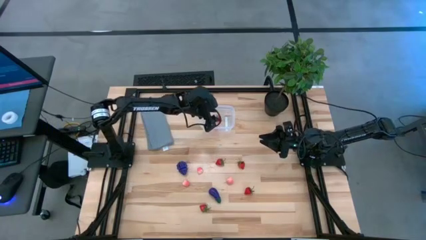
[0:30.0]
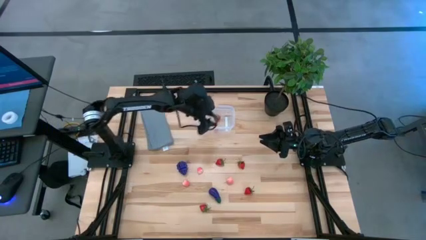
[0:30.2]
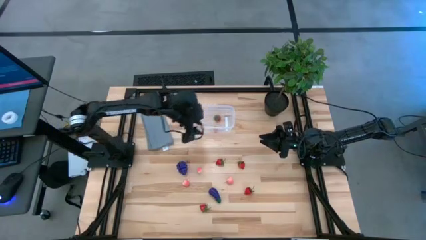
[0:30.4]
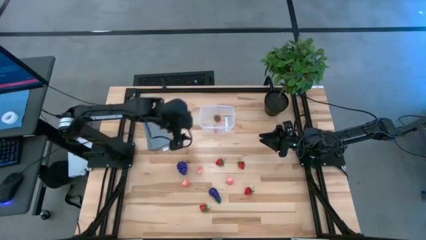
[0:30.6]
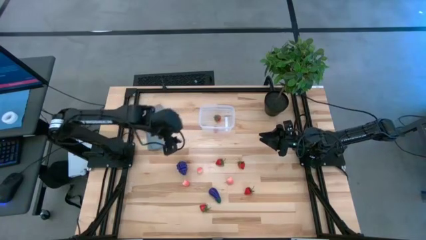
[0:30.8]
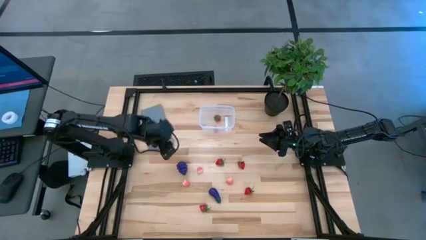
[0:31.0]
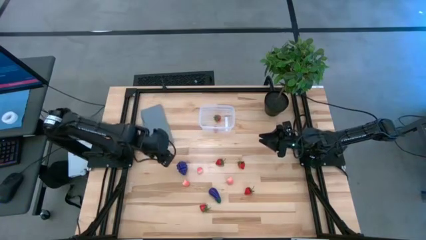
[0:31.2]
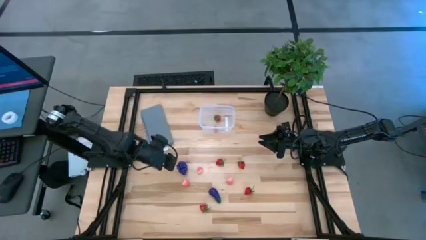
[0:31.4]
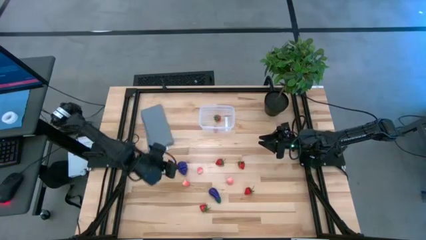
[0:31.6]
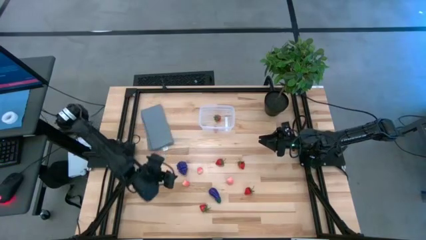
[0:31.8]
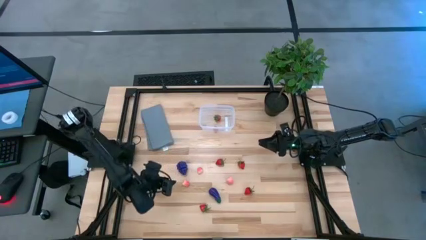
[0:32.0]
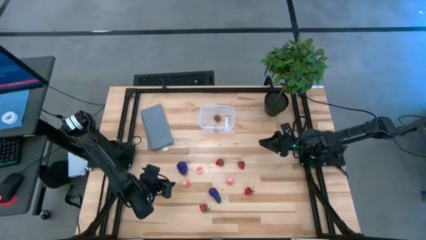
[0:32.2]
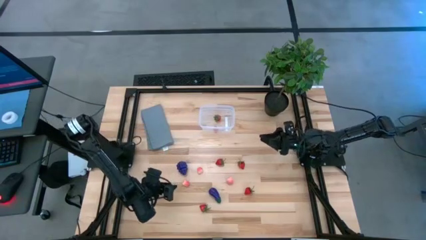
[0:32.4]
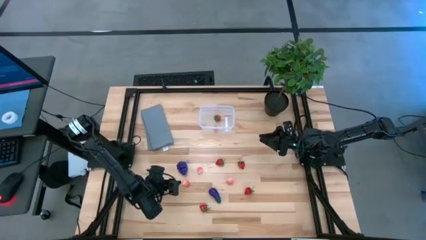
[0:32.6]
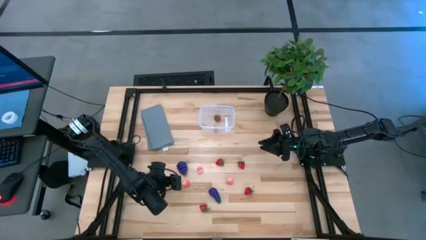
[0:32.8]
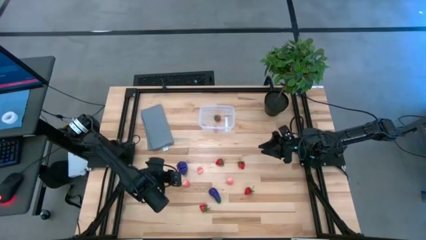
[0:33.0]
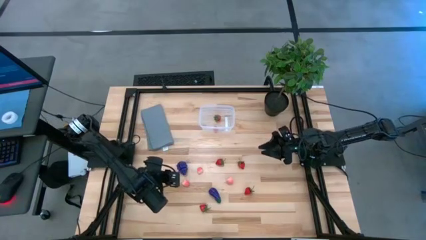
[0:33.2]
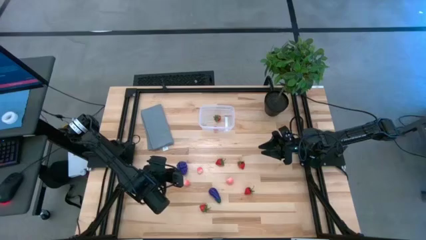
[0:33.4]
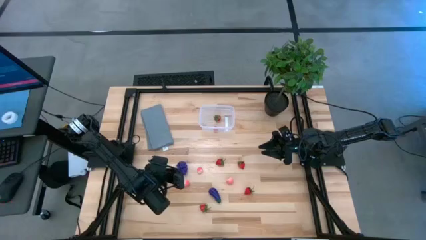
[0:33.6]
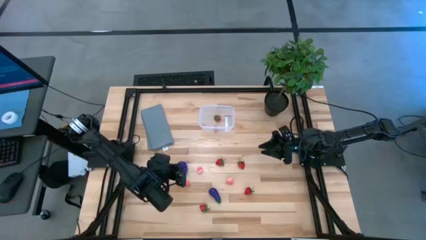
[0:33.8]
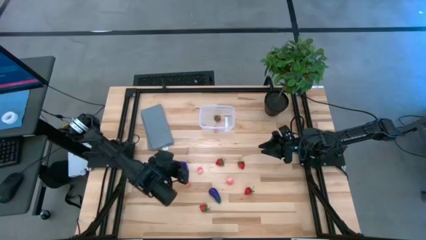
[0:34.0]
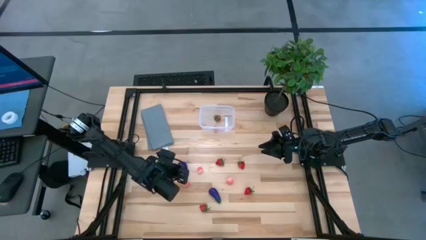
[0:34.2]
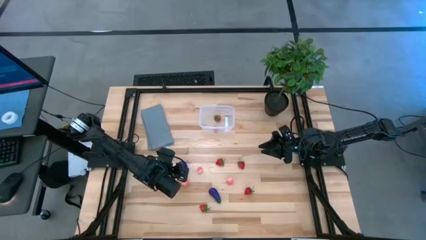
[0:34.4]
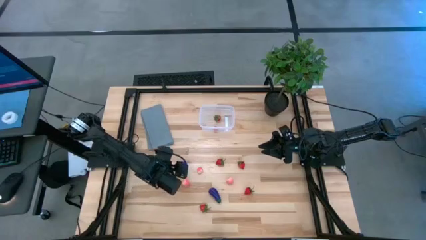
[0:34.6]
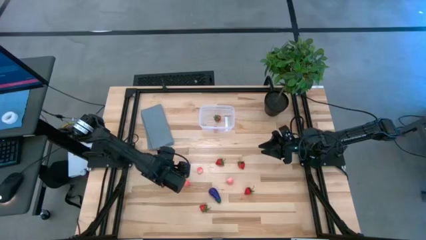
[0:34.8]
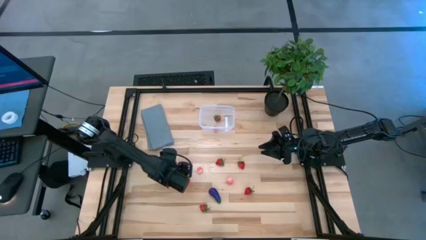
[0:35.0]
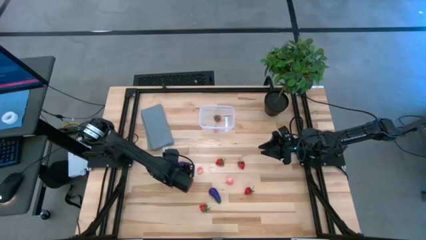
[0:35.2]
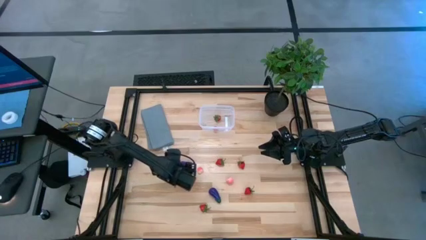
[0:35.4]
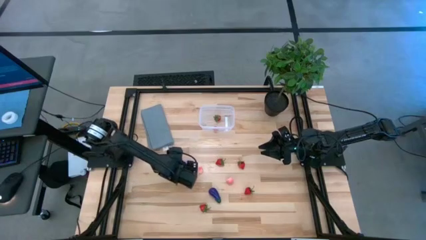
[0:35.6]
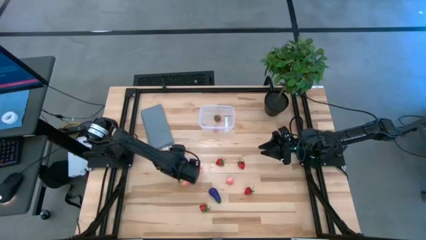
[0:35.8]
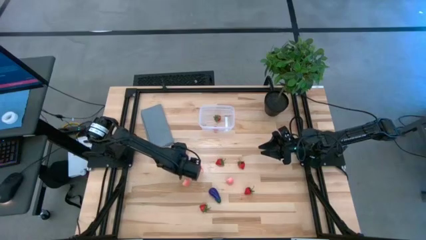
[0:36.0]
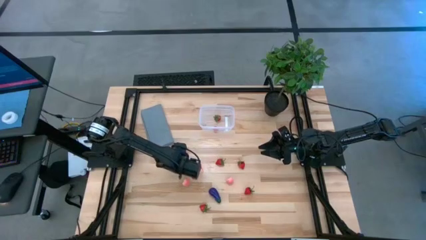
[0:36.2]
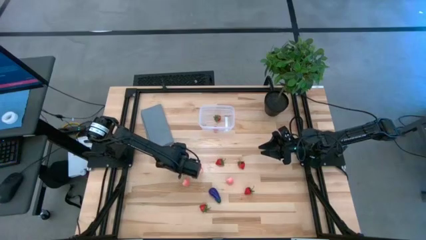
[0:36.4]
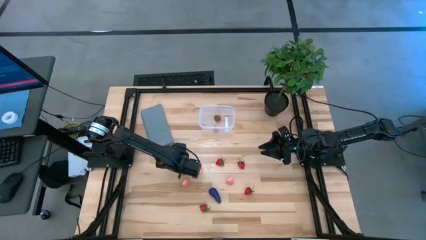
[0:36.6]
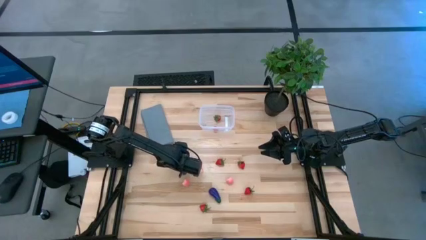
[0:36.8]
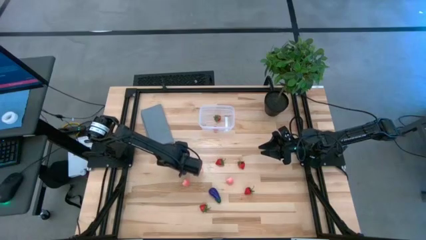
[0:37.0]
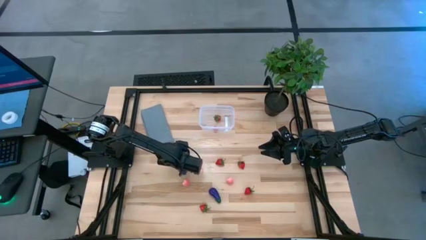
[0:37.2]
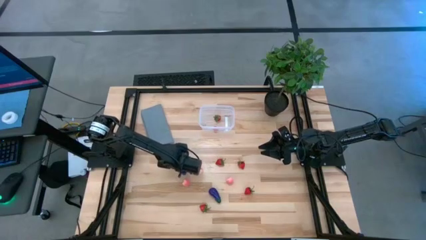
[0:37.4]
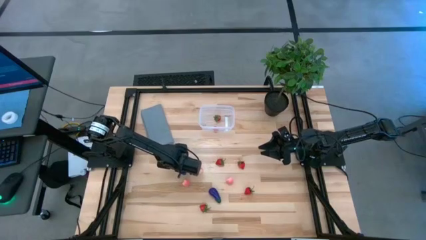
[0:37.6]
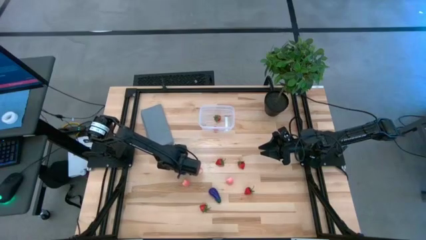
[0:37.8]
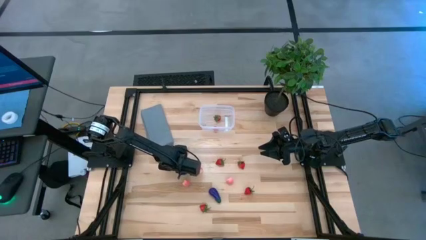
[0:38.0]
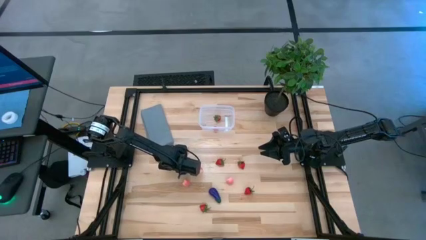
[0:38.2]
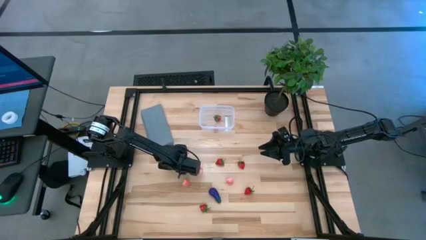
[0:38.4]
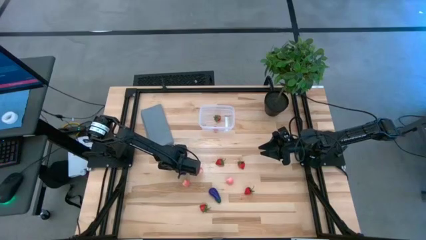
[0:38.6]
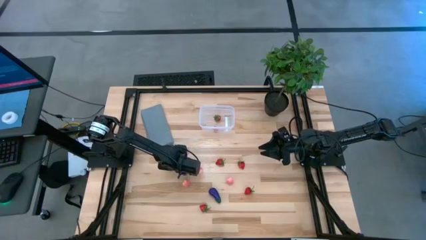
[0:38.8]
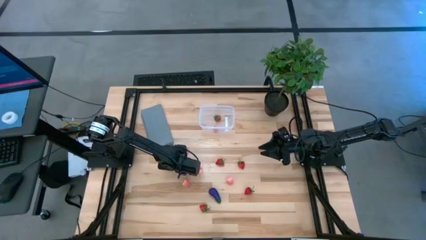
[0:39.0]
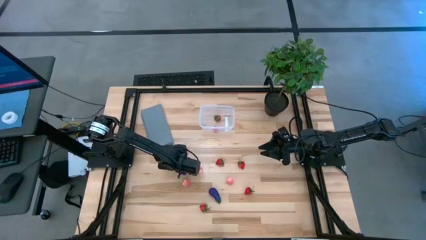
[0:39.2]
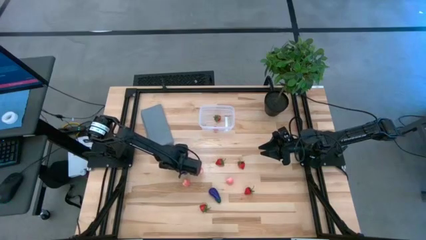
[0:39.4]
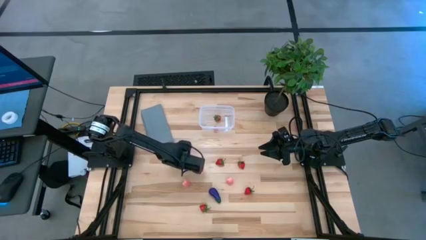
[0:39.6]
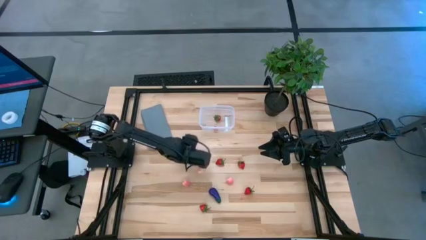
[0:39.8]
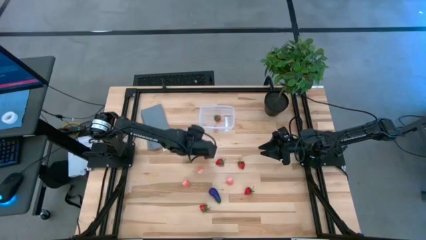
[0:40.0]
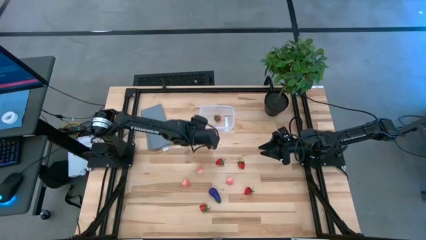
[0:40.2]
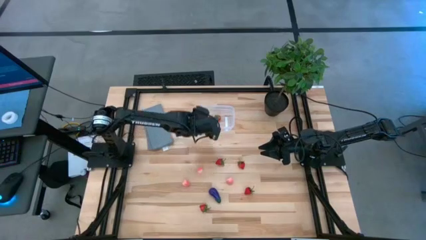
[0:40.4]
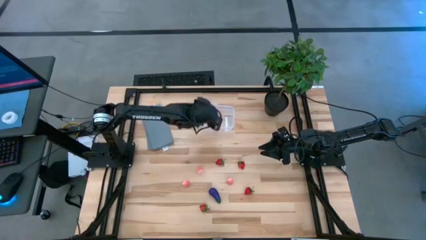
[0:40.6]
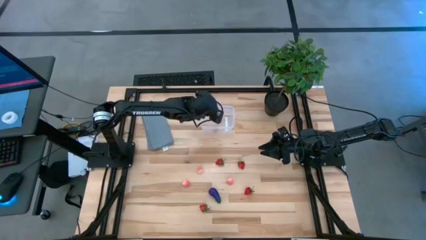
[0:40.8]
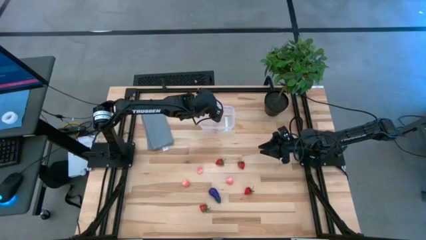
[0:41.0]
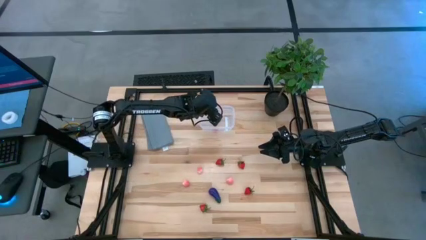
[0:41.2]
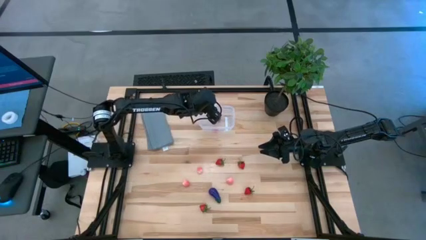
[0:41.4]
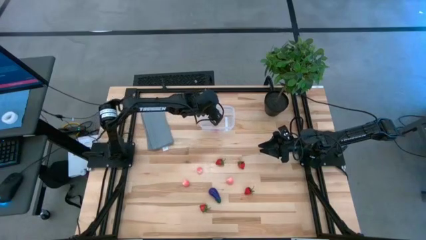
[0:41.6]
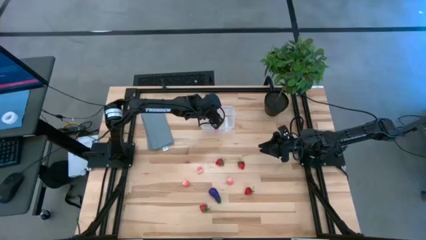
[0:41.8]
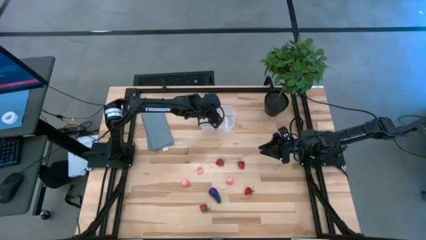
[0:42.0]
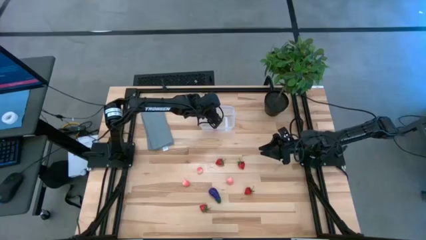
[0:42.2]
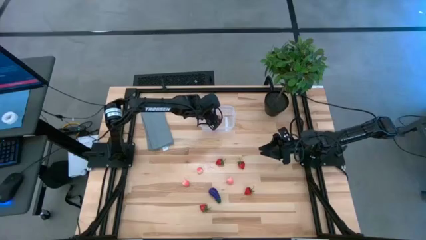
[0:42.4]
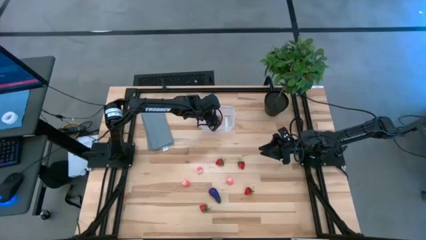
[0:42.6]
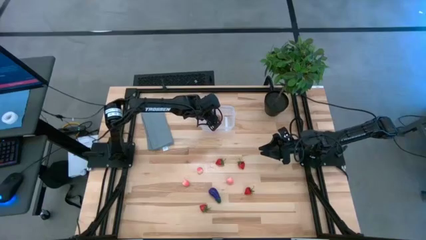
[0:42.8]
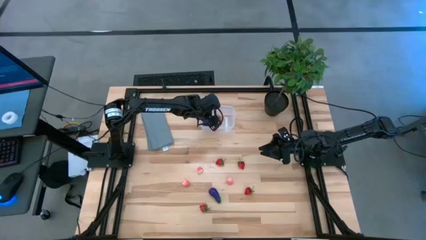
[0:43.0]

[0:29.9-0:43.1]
Task: Pick and placing Produce into tupperware
Put the grapes into the transparent bin

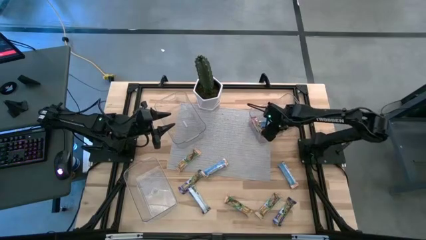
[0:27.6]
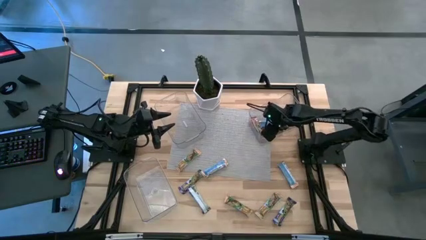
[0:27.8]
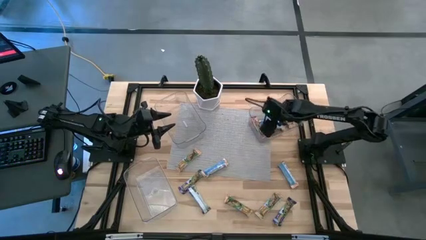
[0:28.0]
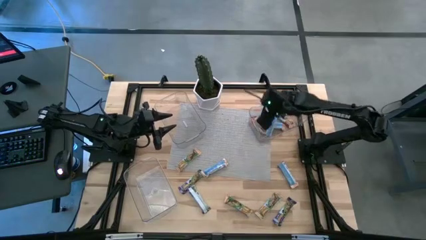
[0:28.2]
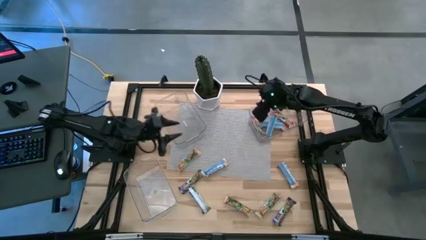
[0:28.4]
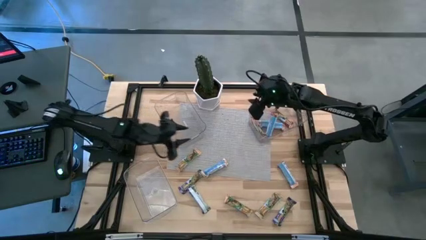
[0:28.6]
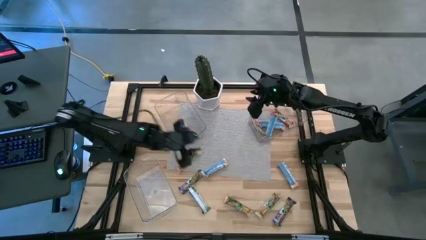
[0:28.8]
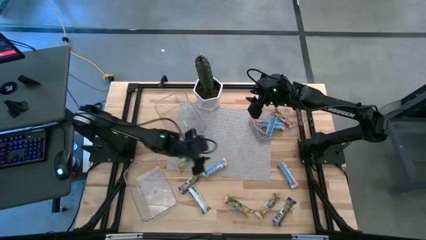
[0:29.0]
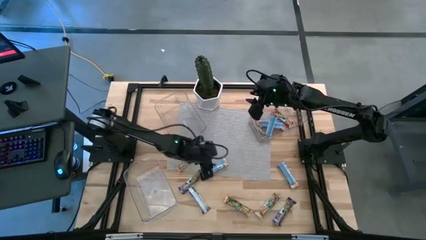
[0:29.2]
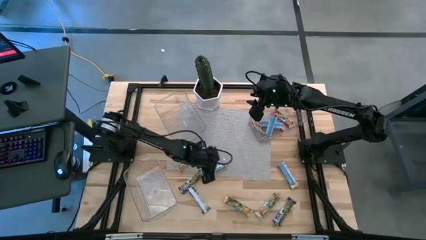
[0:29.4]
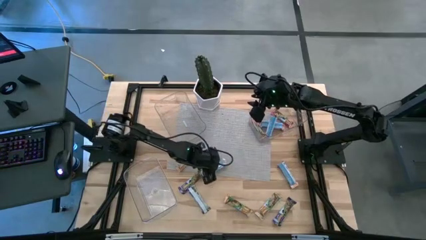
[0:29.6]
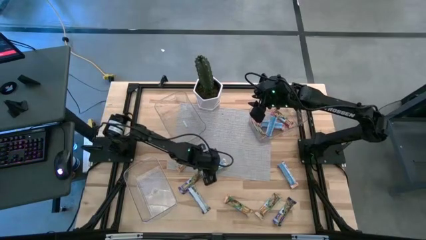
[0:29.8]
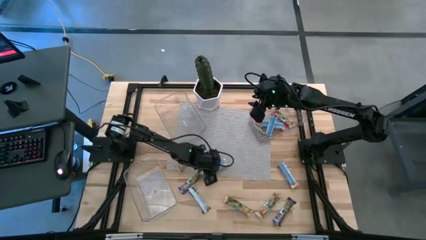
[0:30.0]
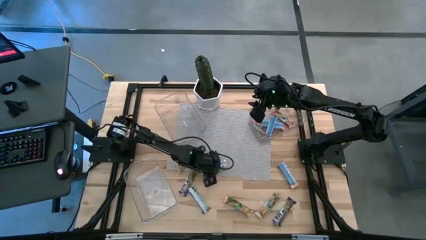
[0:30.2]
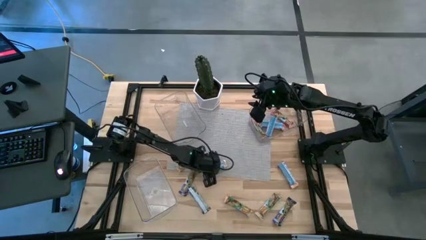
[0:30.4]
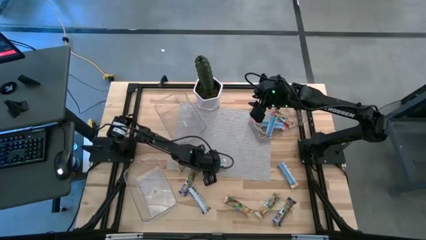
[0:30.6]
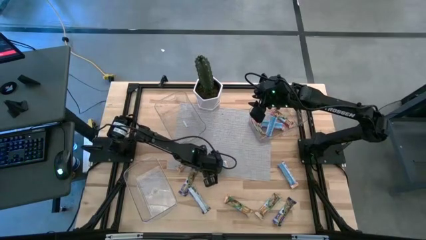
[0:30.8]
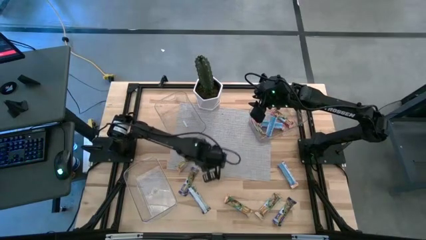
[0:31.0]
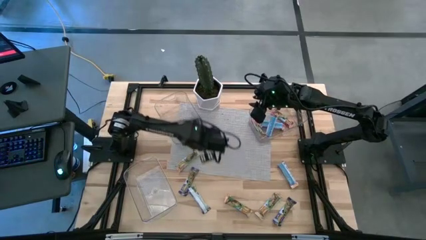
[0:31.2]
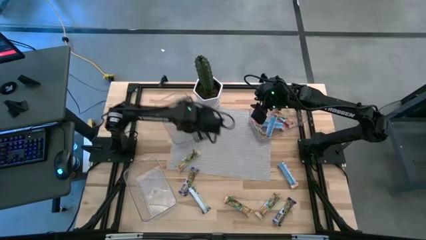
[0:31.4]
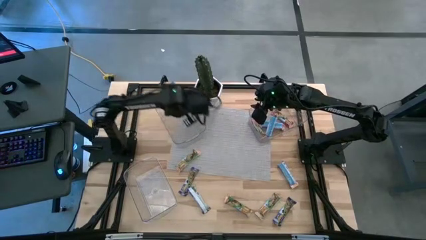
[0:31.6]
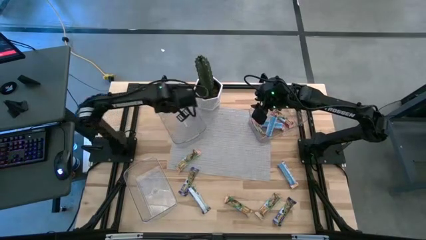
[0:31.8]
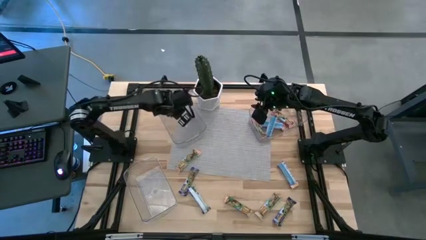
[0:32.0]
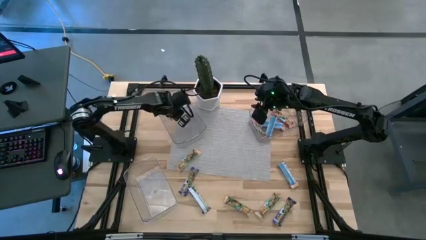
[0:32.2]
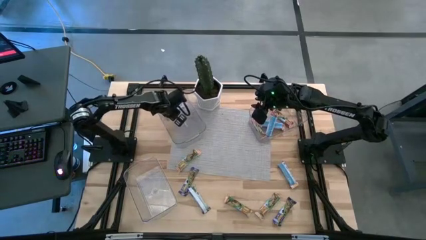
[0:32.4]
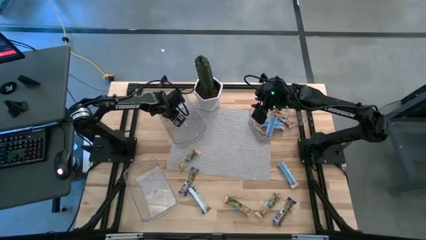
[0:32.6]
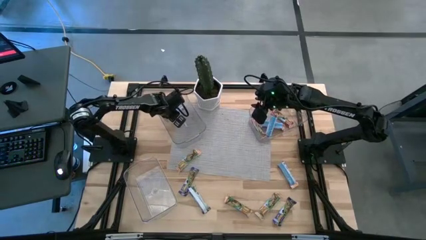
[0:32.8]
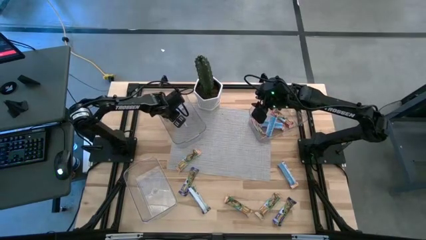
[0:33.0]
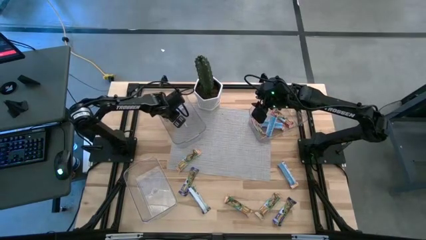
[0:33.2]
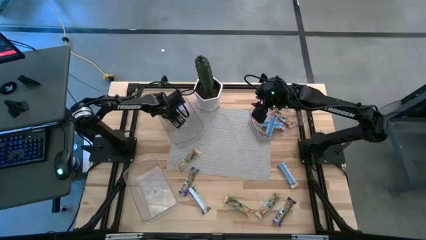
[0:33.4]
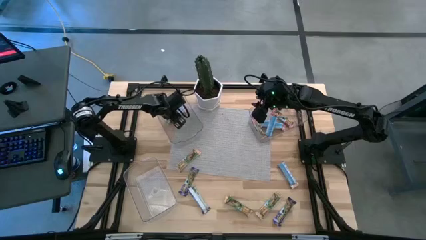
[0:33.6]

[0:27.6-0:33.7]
Task: Pick and place Granola Bars by type
Put the yellow granola bar into the top left transparent bin
